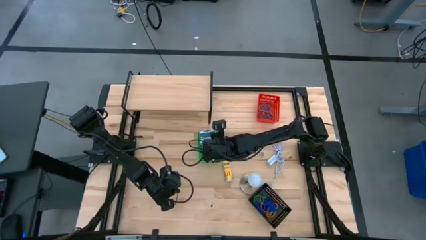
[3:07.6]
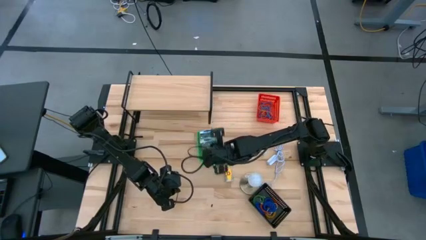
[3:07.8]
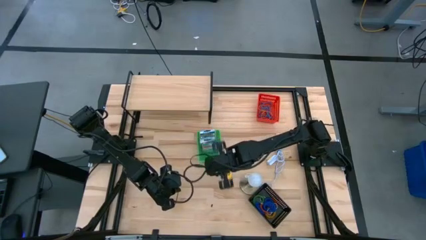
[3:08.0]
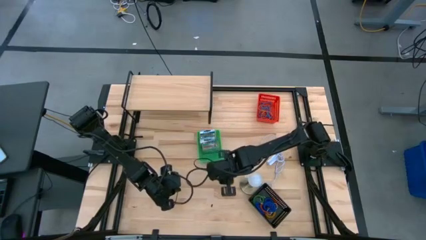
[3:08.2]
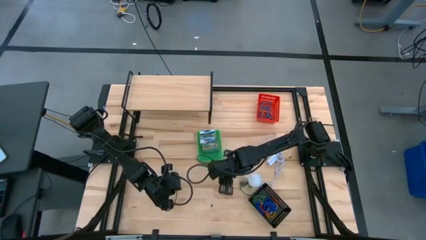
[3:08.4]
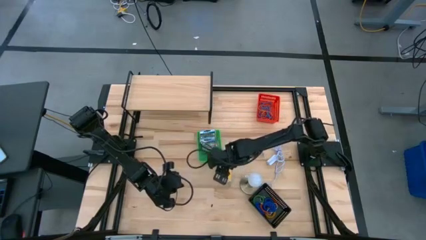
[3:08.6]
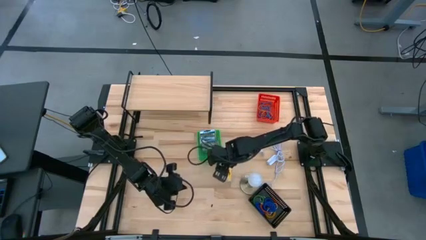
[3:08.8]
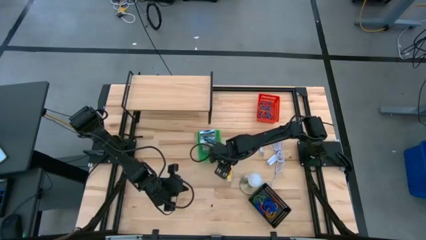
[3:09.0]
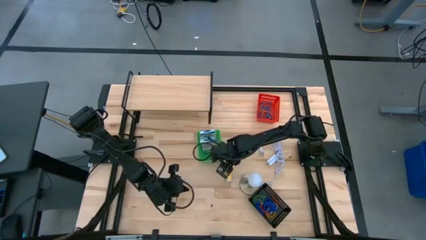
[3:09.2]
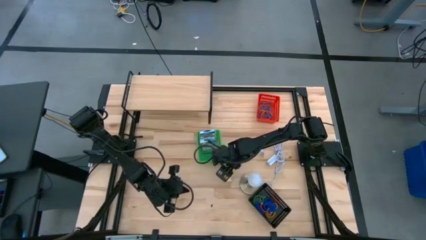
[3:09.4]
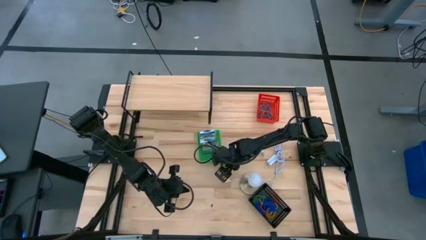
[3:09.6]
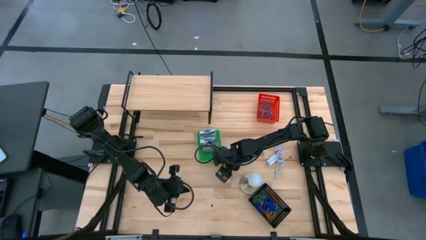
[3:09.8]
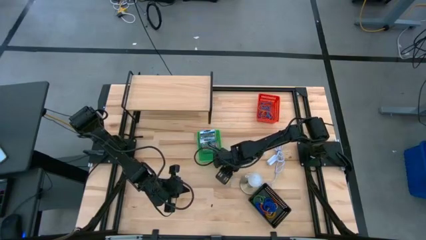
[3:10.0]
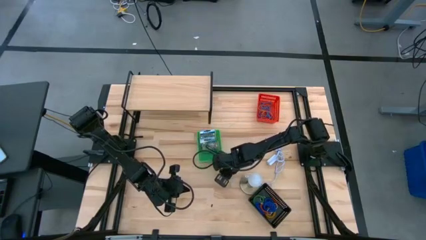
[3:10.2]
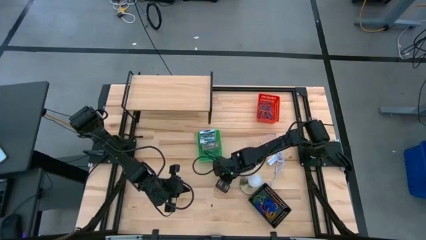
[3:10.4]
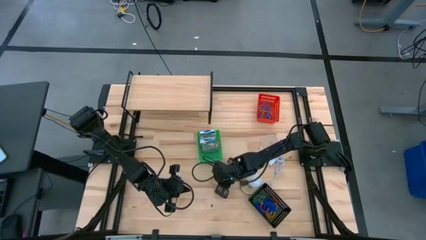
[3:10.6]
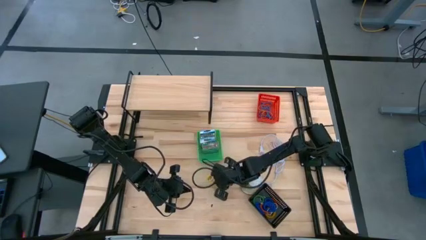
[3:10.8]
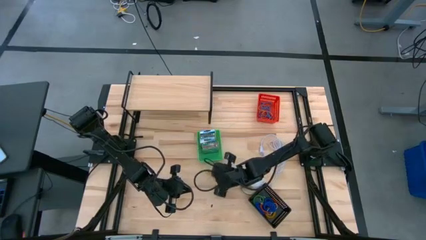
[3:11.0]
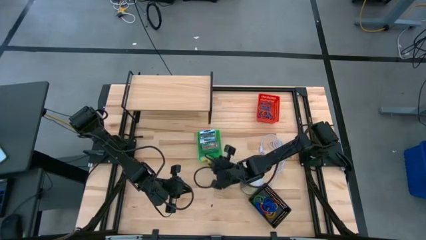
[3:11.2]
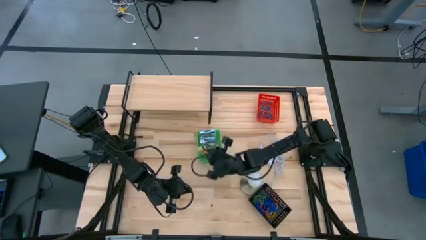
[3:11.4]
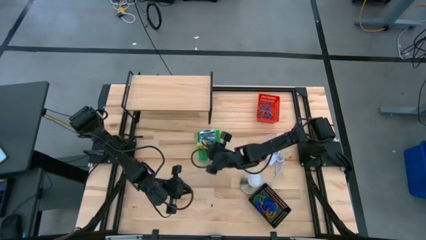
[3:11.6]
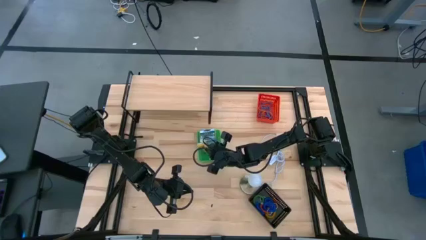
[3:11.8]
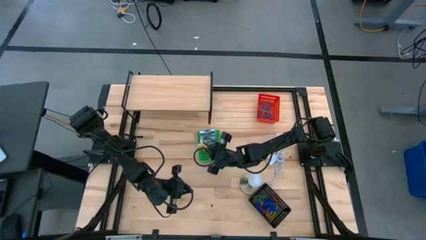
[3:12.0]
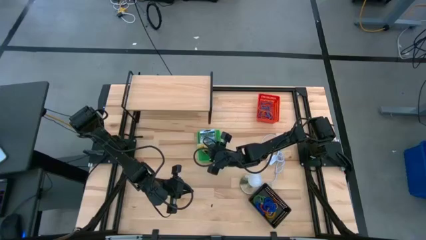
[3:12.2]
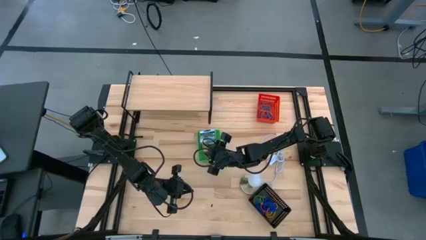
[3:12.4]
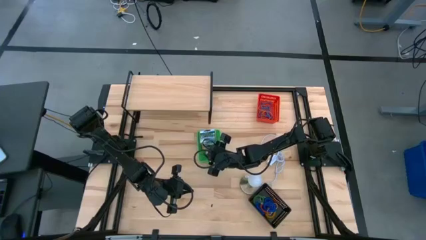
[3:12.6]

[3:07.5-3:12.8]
Task: Pick & Place Office Desk Supplies
Put the yellow crayon box into the green basket

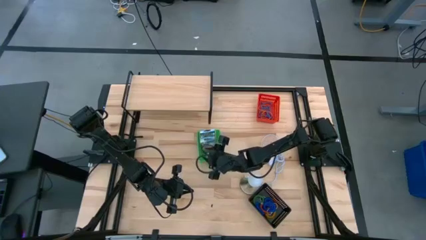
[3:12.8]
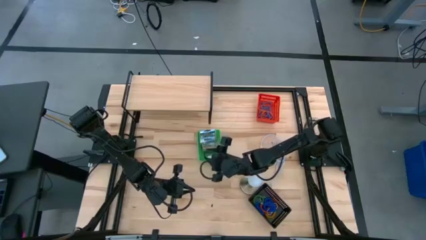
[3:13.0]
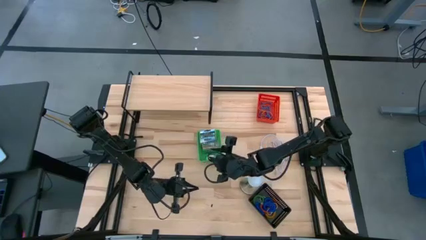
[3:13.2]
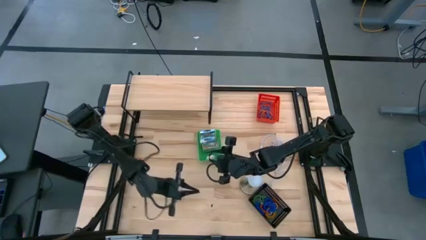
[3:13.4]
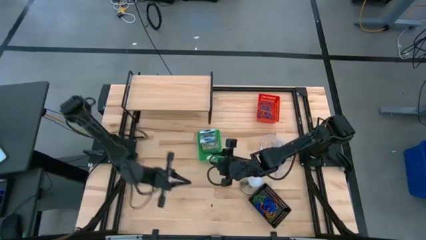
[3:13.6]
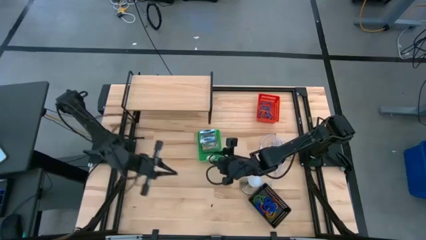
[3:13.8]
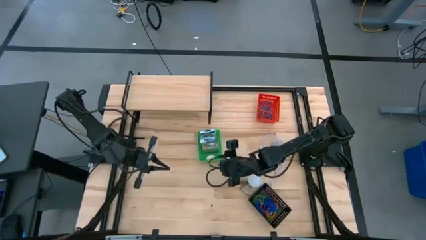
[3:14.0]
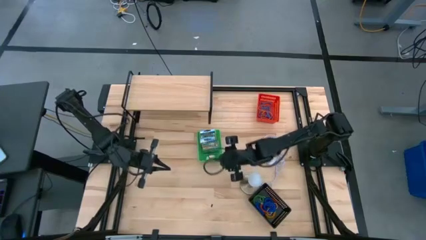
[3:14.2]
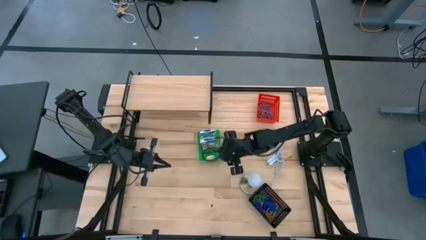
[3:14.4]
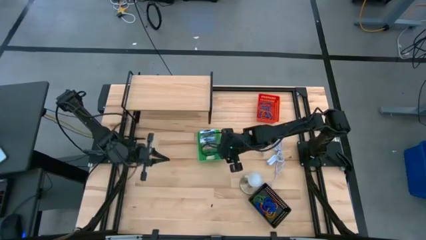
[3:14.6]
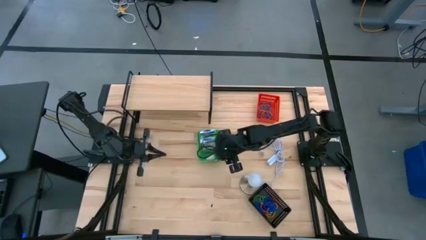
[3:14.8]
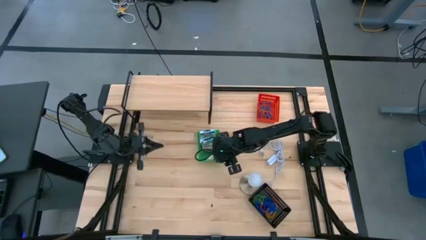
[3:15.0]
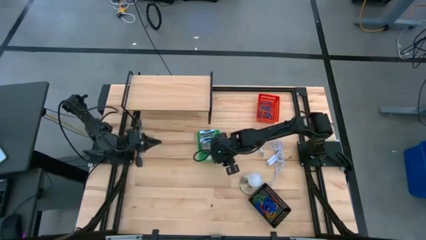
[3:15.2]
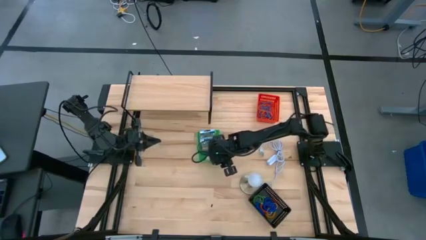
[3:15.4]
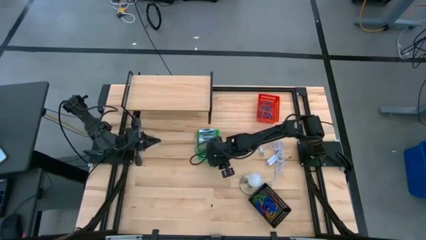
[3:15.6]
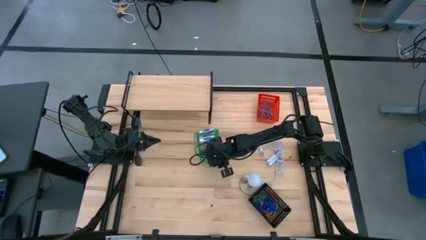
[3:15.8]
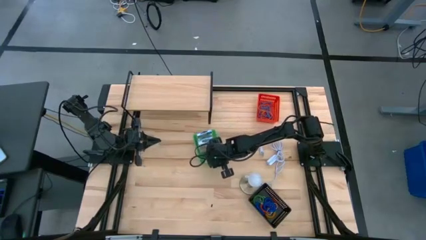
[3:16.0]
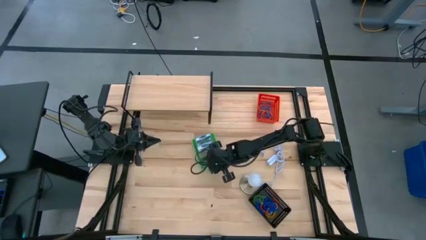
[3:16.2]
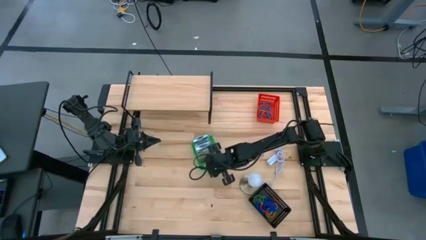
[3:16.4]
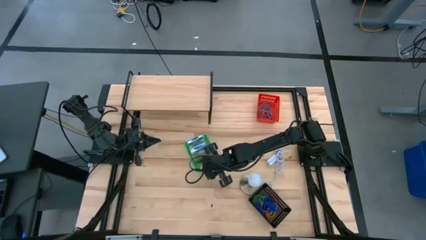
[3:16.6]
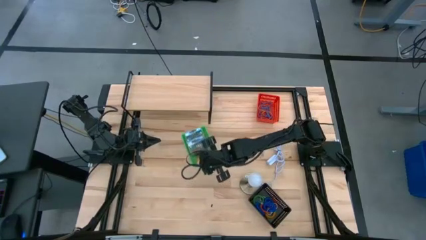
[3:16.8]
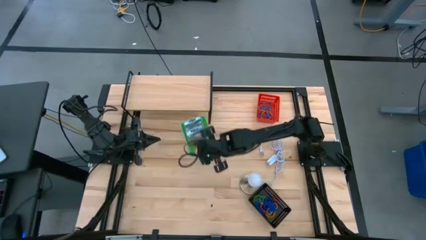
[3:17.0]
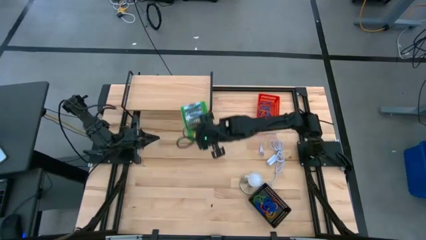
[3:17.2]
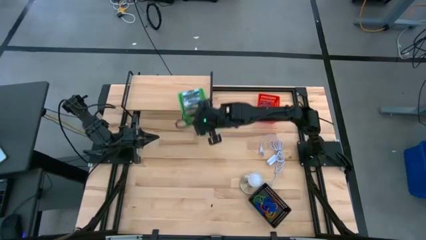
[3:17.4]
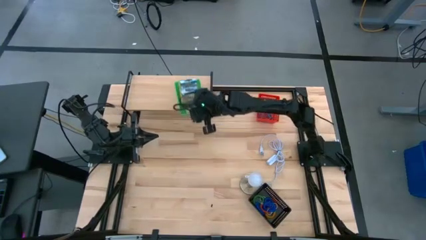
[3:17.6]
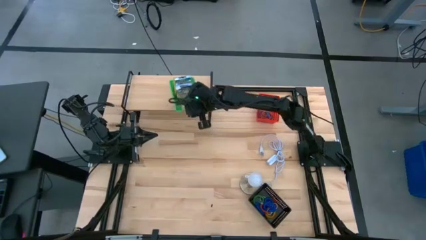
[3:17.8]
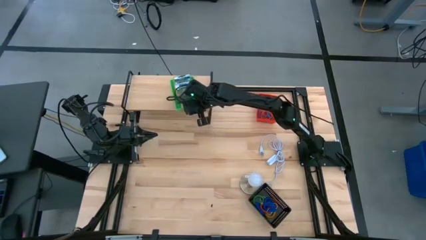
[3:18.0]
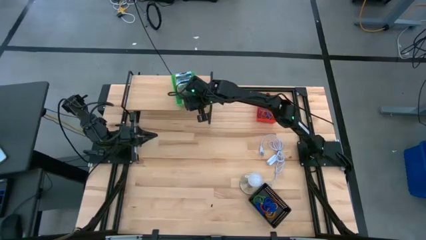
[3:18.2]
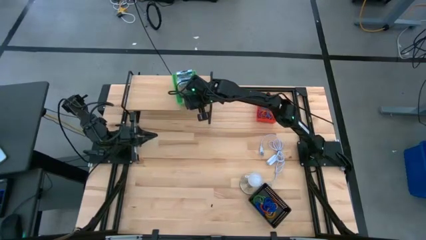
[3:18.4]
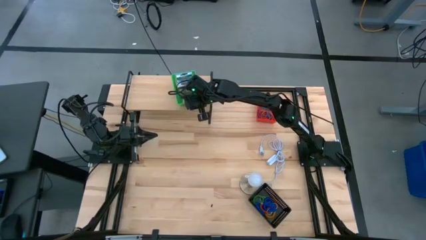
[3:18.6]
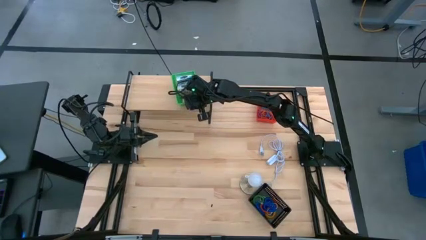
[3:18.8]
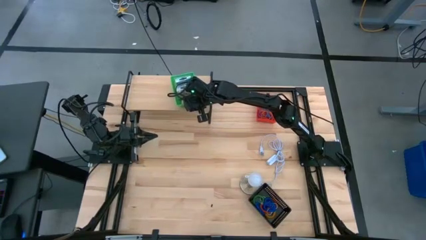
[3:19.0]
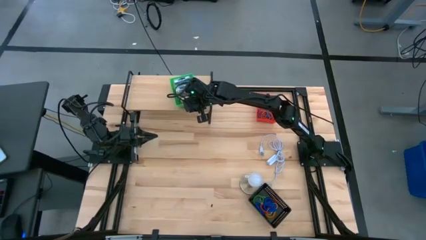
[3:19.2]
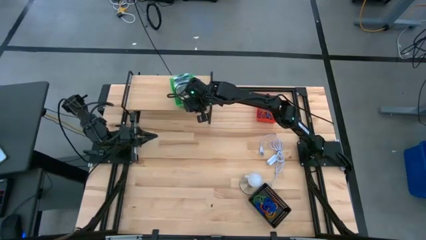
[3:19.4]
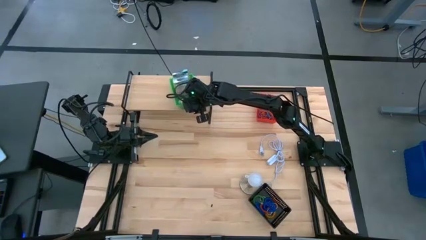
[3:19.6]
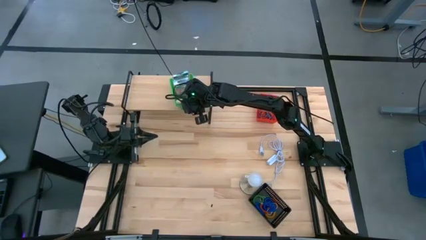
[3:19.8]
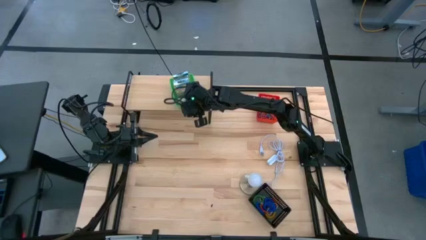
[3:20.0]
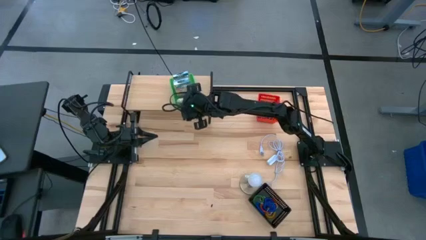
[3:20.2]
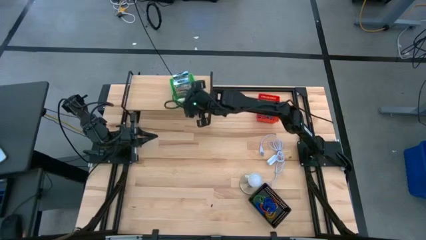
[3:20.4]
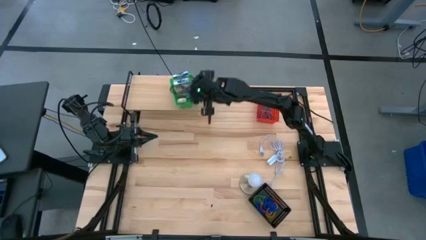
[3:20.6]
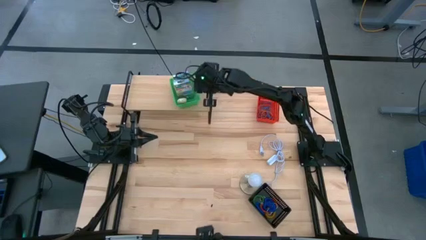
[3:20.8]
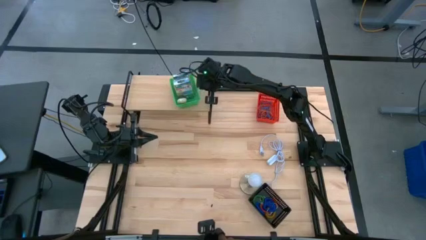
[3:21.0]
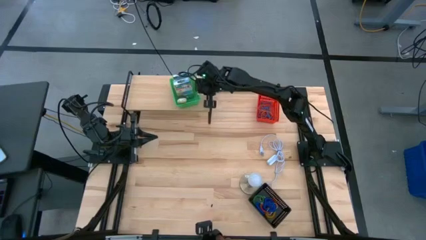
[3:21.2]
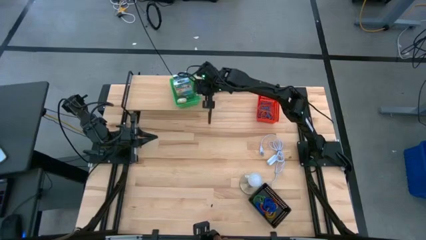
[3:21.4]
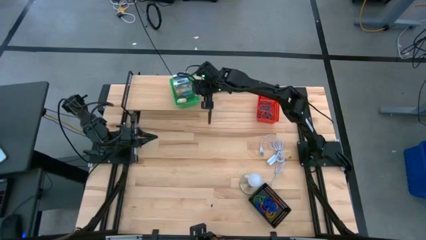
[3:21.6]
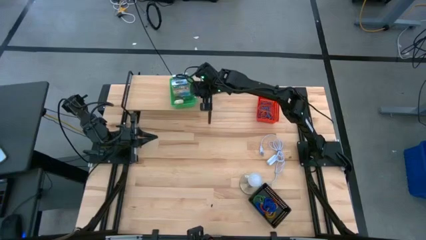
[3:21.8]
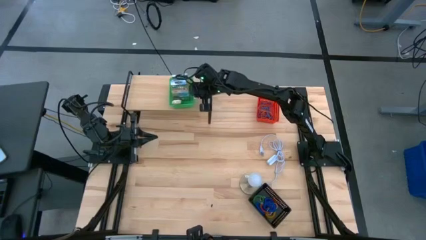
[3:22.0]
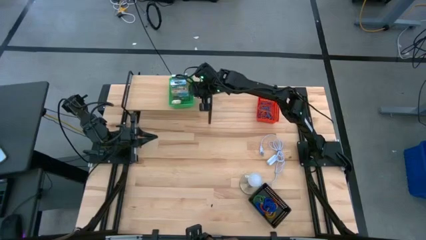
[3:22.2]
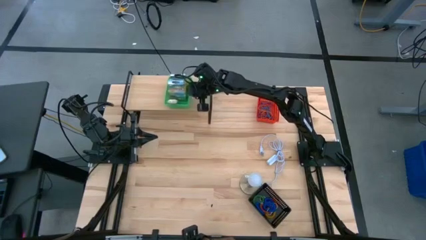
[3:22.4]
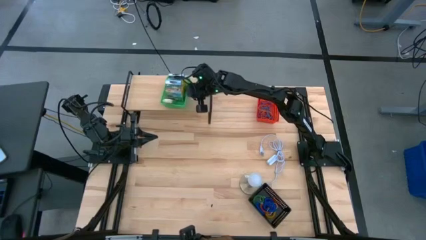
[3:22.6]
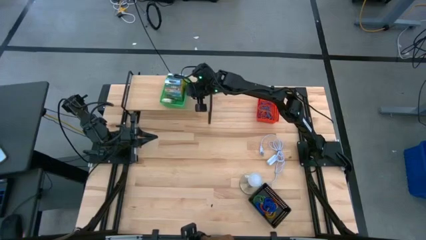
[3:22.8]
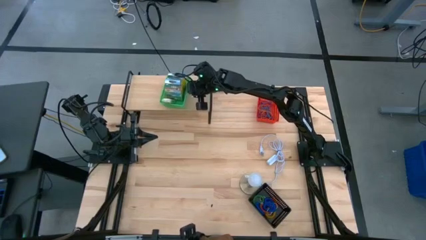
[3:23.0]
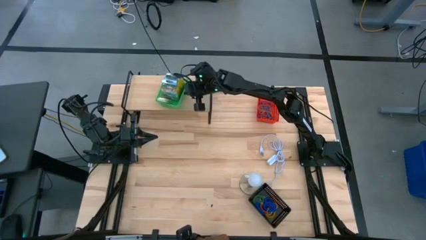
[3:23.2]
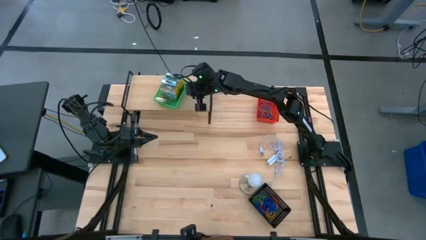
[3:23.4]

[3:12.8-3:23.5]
Put the green basket on the shelf
